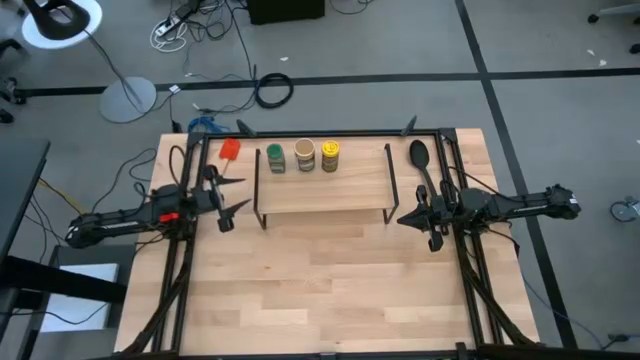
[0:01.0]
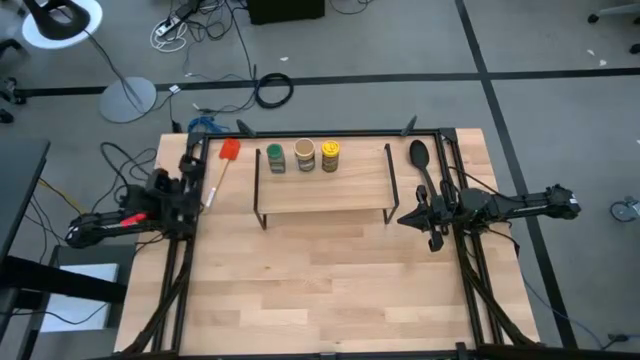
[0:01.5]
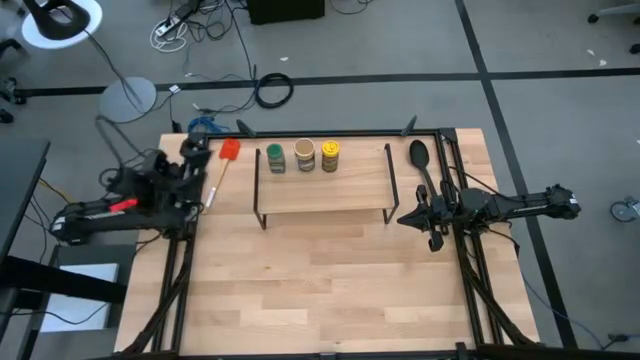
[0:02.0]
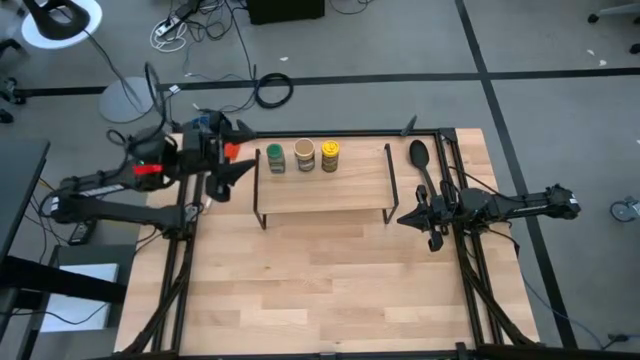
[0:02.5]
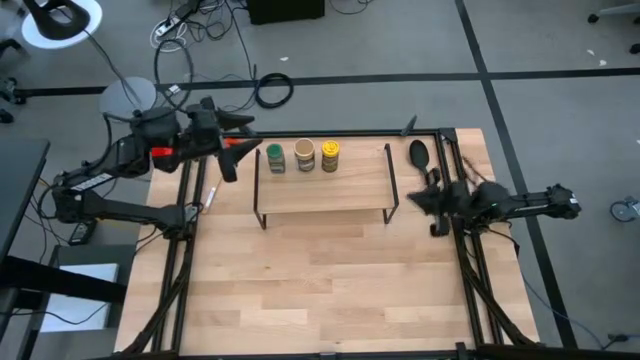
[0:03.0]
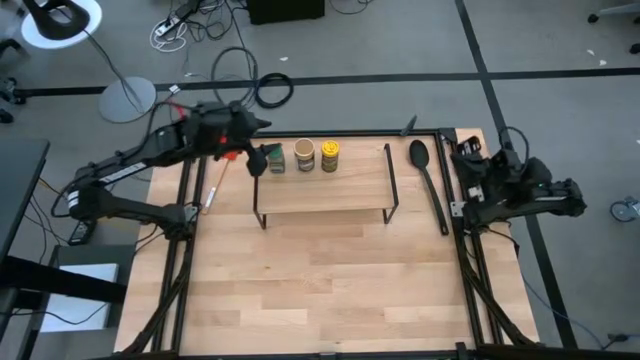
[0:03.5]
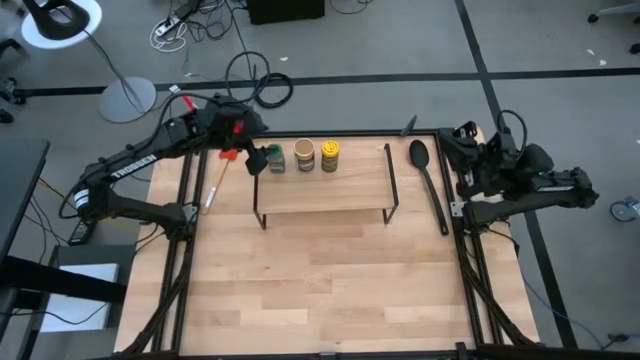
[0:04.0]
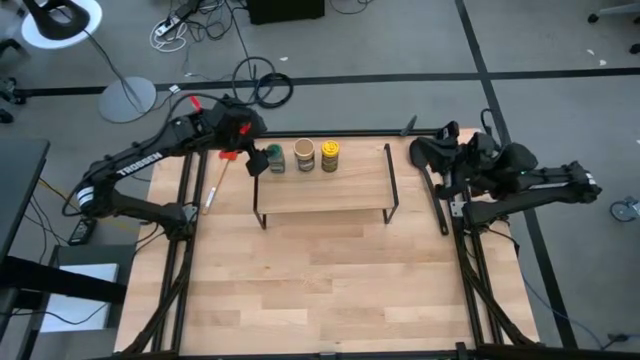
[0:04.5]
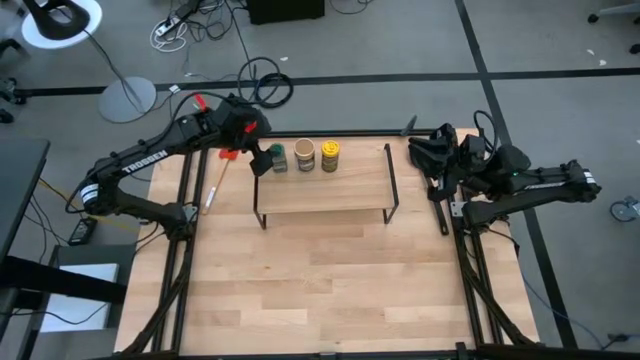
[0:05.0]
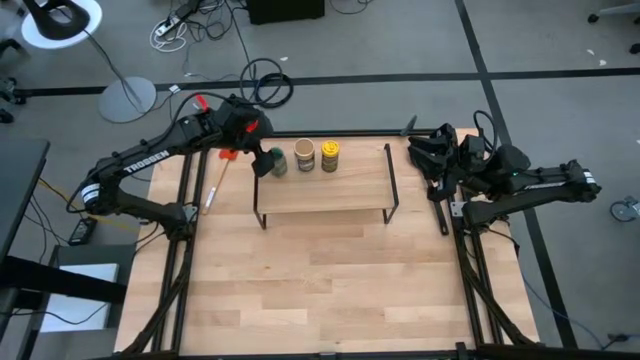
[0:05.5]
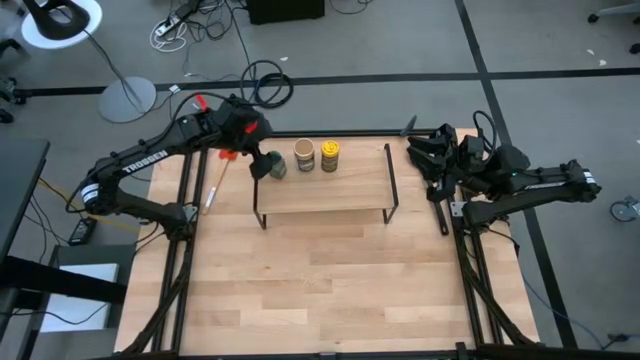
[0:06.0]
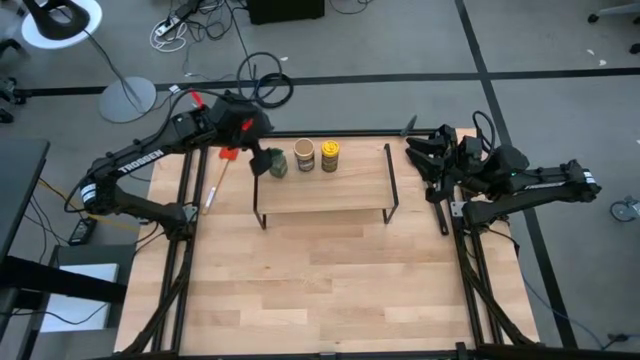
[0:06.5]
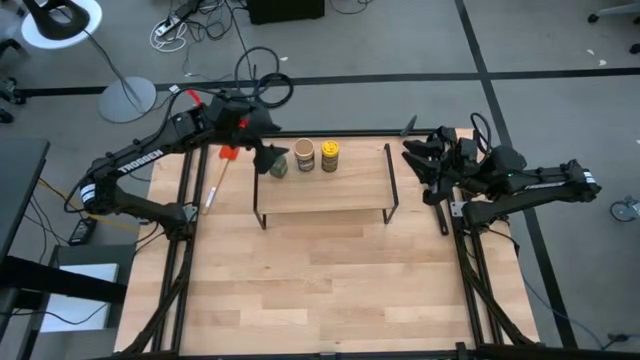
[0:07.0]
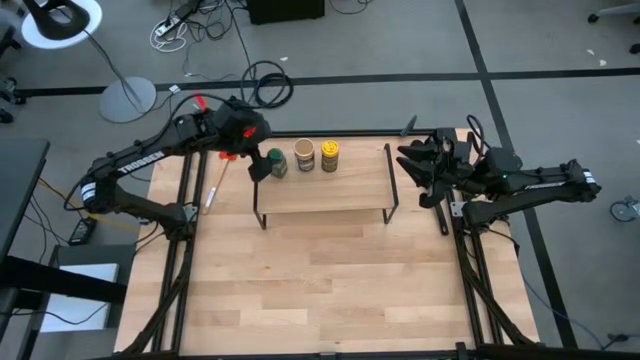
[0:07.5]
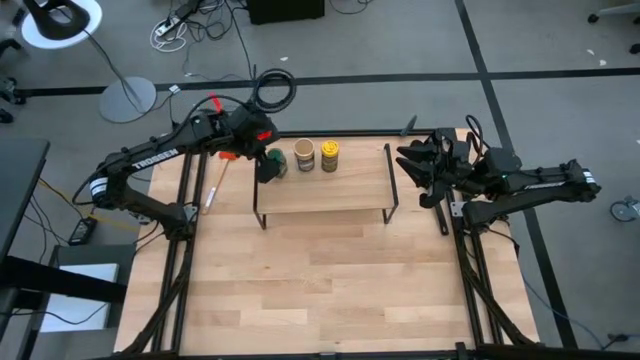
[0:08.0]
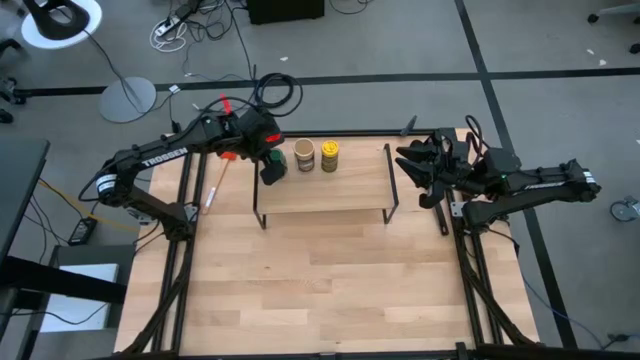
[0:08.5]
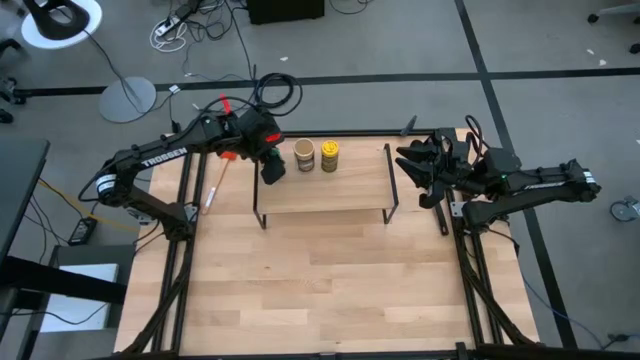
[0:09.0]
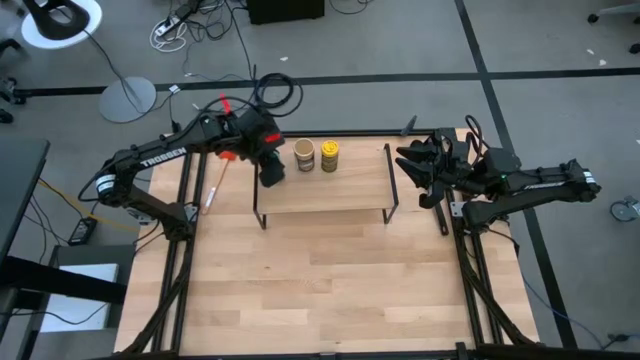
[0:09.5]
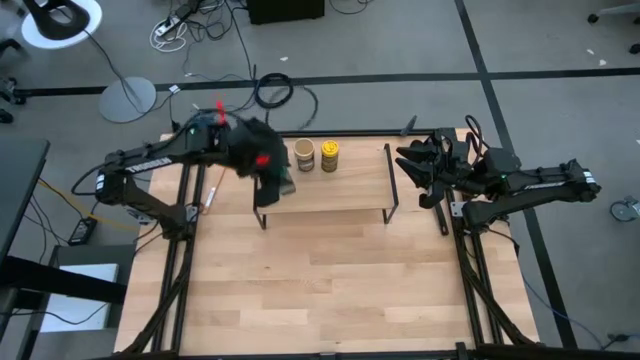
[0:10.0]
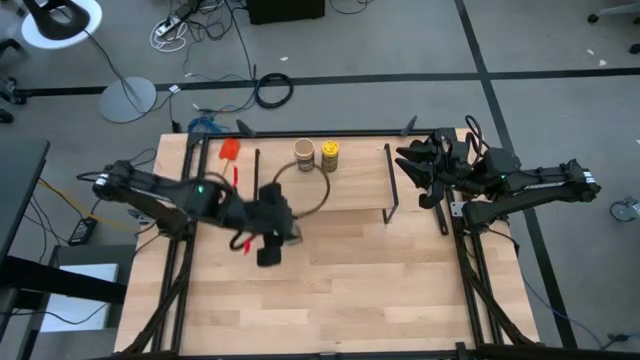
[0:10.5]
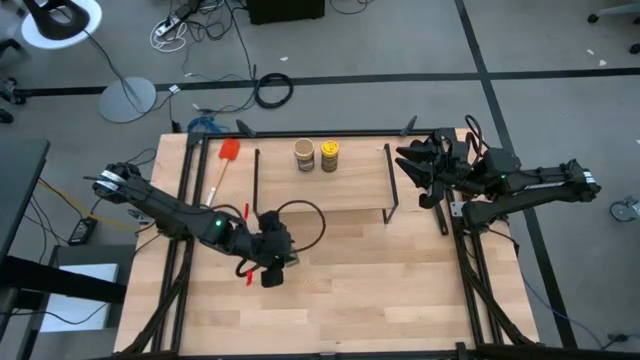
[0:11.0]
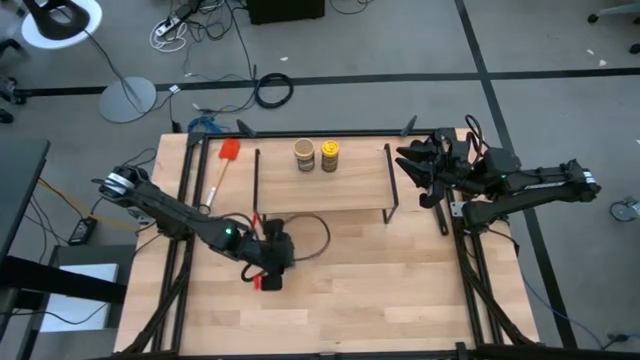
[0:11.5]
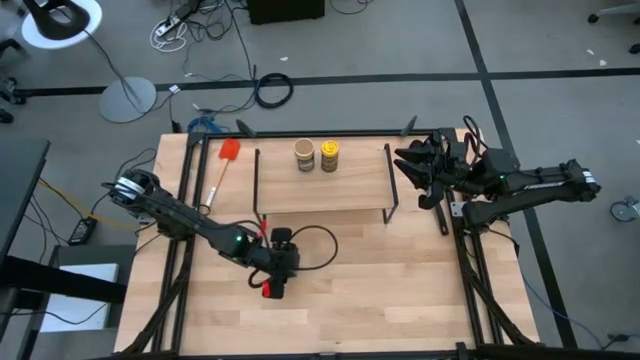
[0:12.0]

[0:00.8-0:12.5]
Task: Shelf spices
Remove the green seasoning bottle from the shelf

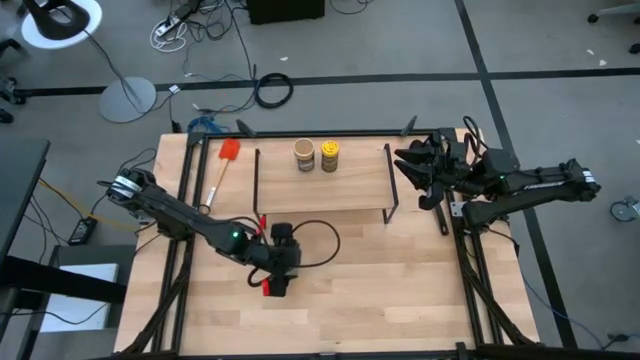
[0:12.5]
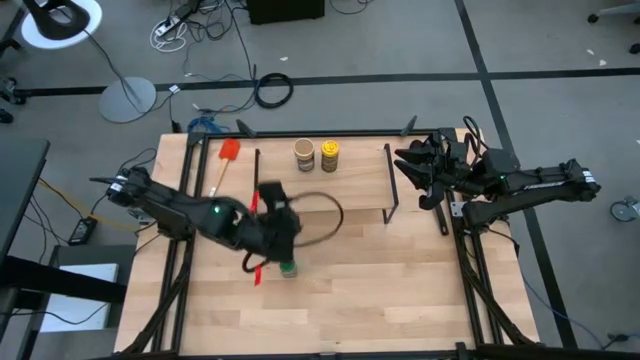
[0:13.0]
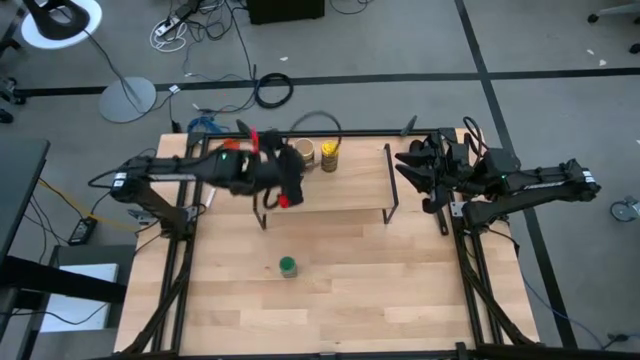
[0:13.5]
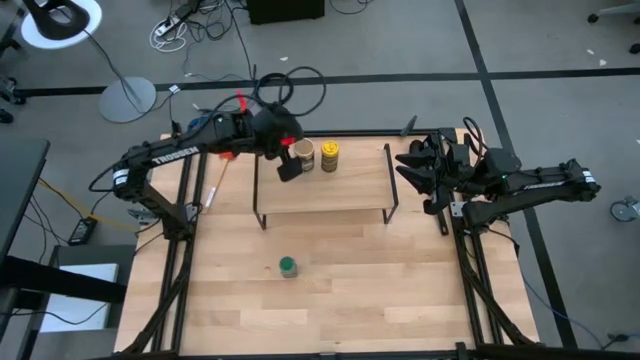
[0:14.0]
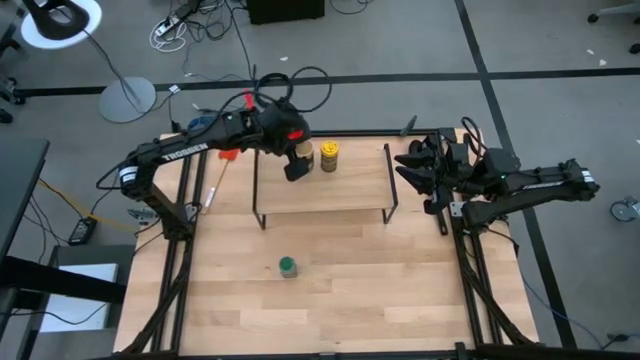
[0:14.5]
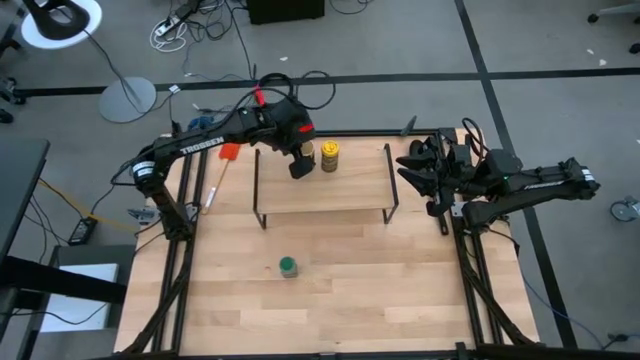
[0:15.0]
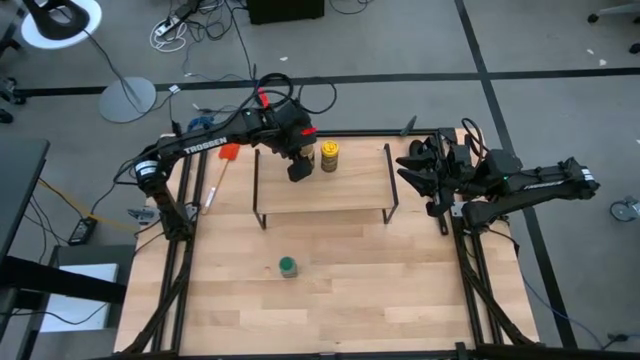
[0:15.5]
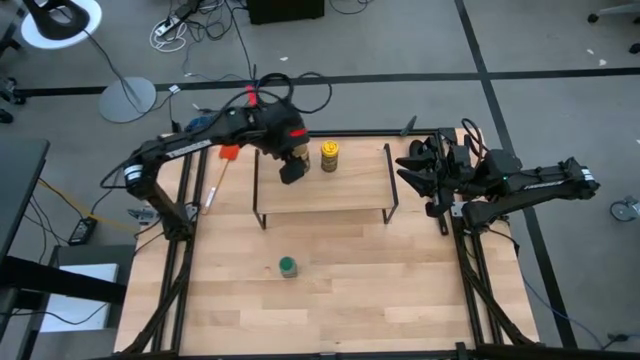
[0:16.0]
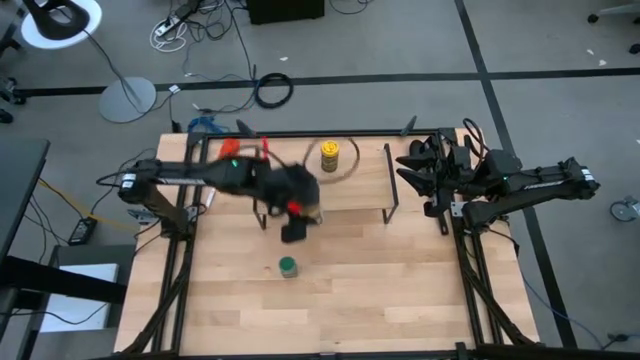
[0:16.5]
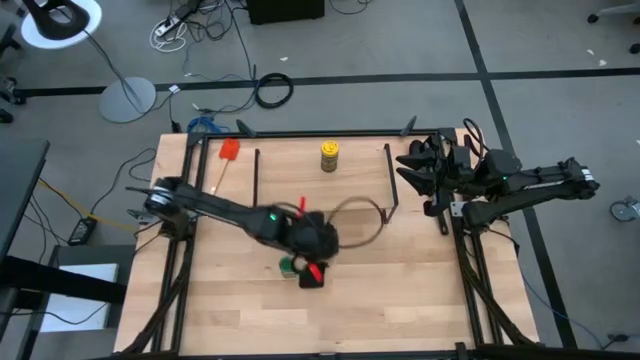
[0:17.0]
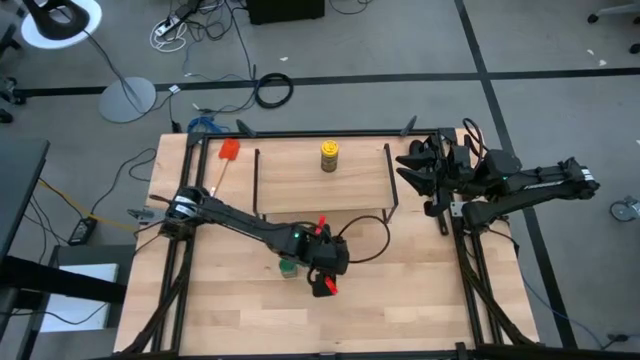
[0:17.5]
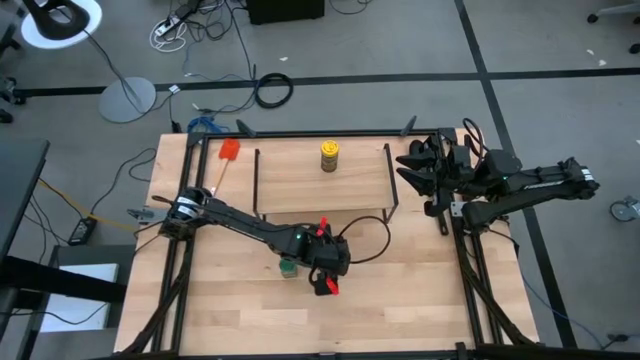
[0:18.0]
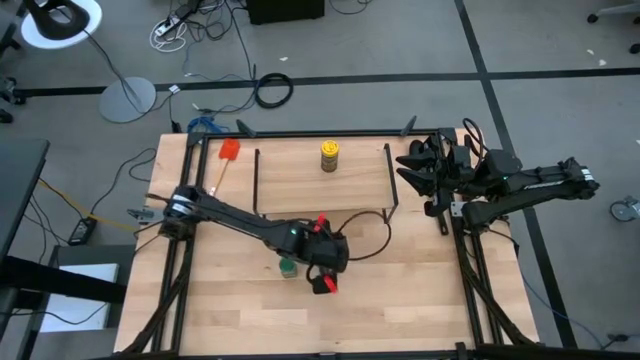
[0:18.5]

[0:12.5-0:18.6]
Remove the brown seasoning bottle from the shelf

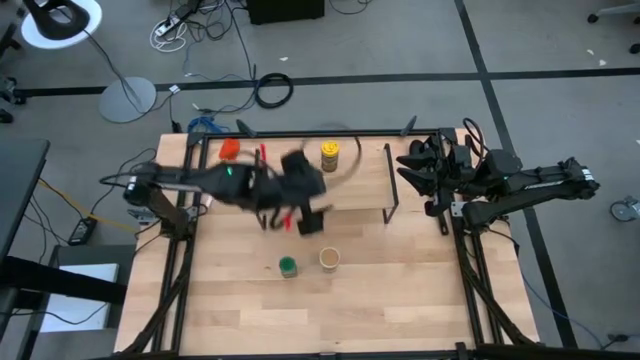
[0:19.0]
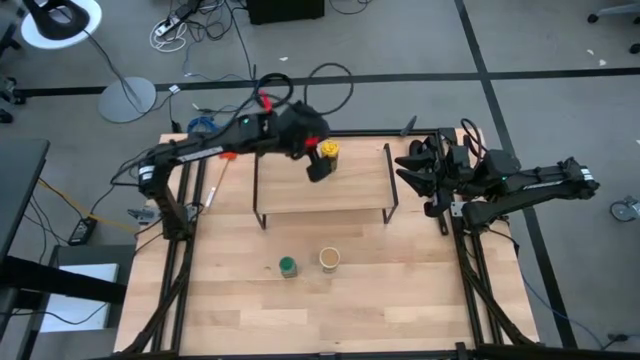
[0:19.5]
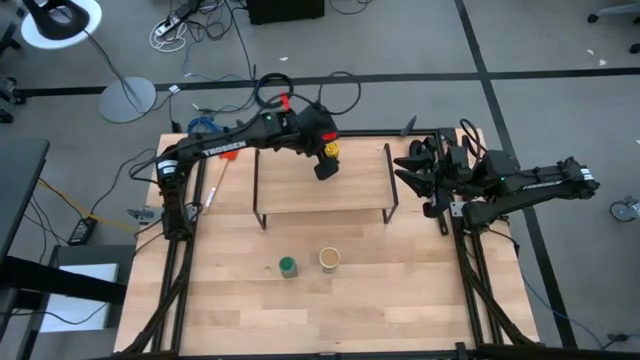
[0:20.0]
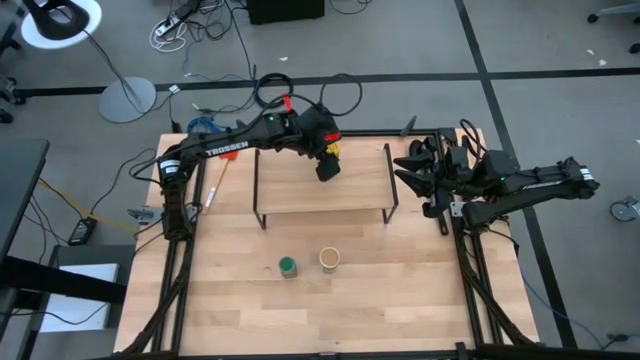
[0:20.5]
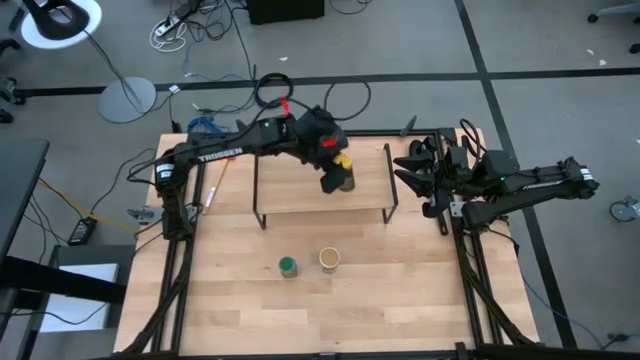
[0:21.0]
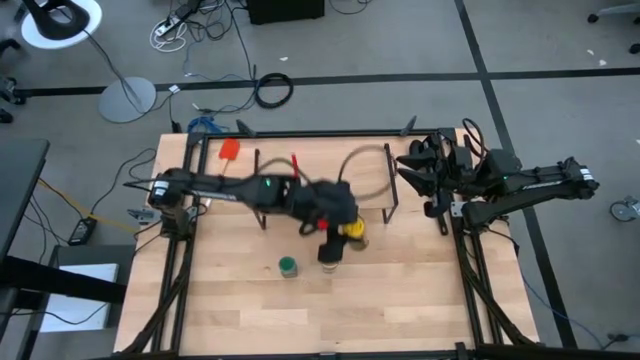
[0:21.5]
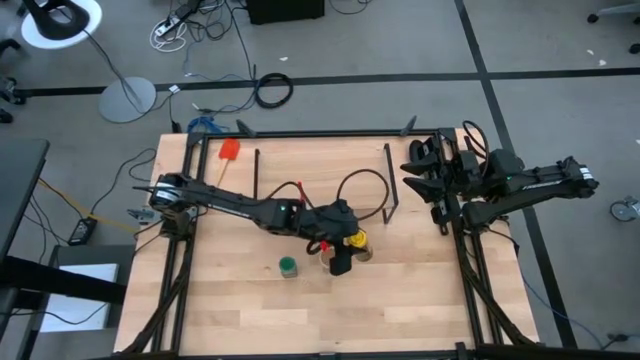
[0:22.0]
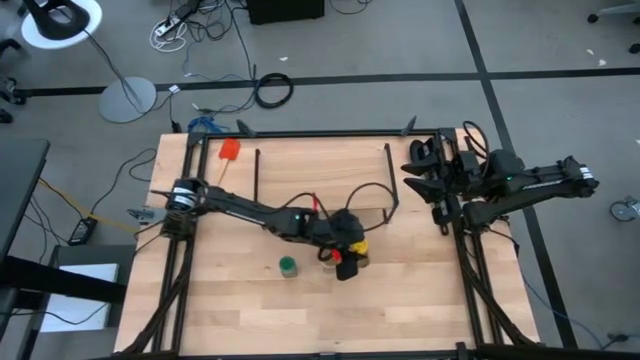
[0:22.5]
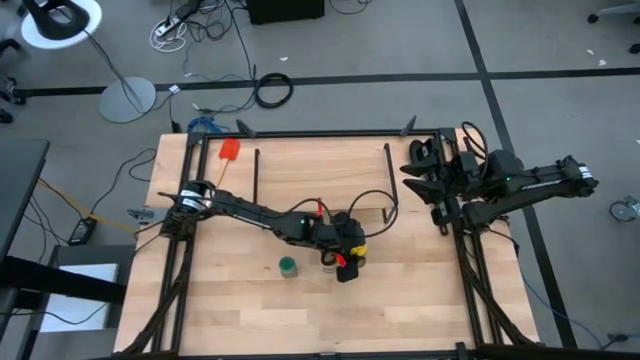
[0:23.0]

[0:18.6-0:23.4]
Remove the yellow seasoning bottle from the shelf
